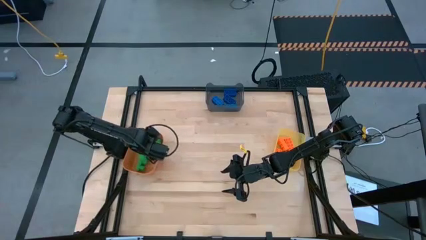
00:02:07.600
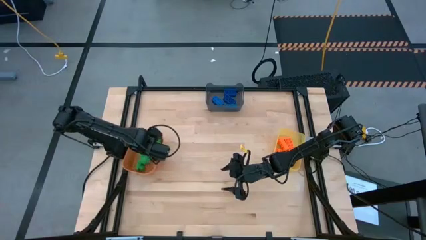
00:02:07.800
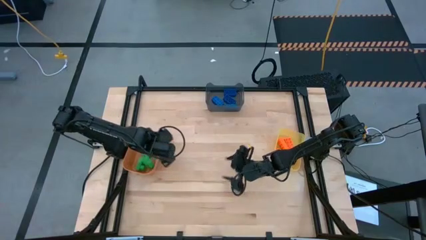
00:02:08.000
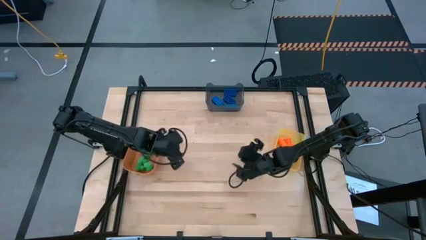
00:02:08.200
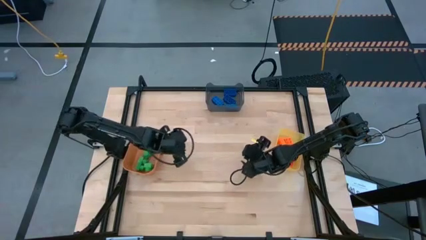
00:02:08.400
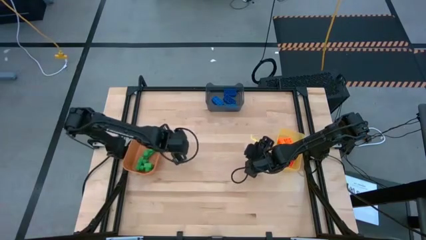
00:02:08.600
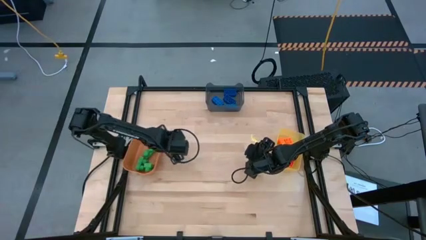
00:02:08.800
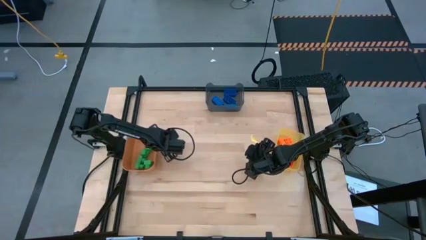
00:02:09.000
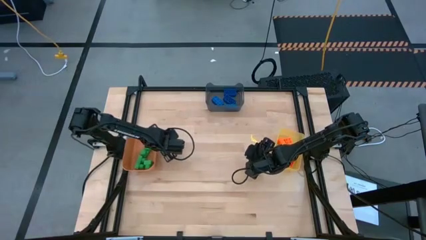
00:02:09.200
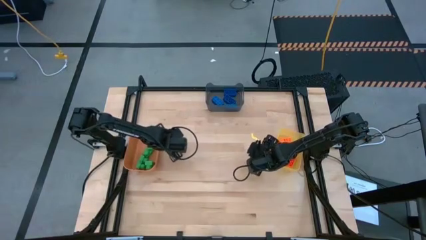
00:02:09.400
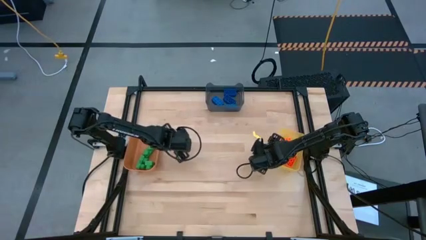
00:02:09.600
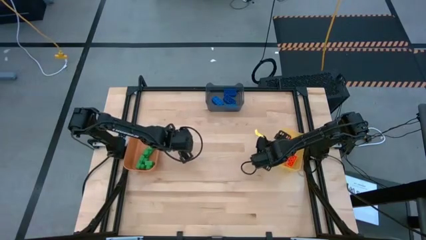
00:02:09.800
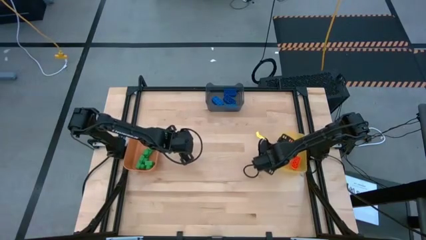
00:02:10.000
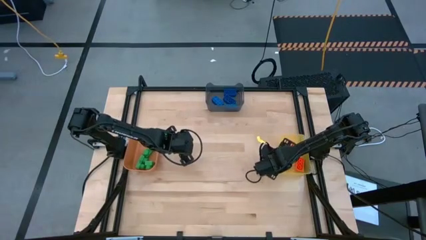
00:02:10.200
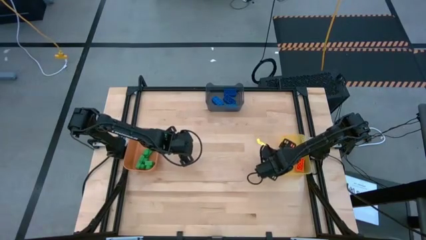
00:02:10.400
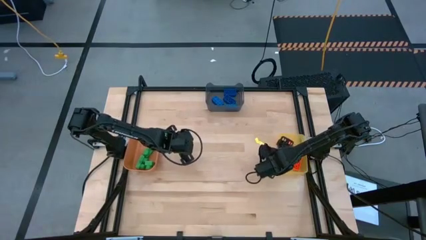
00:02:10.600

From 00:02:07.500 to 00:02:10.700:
Task: Sort & place blocks by color
Adjust the bins on the table

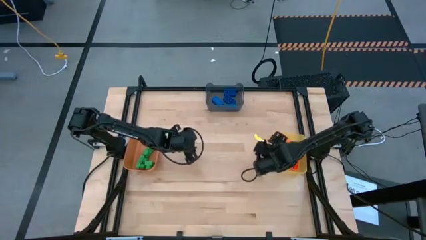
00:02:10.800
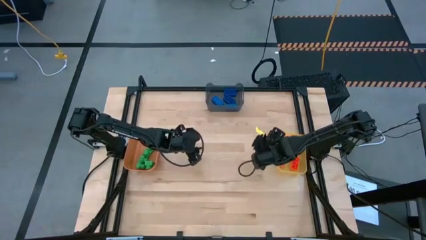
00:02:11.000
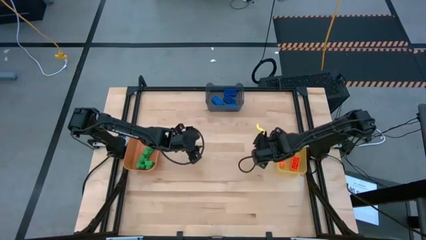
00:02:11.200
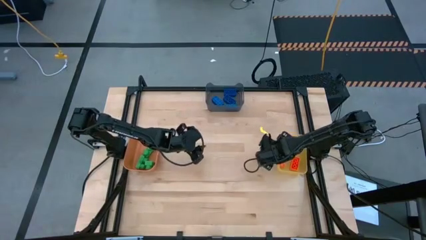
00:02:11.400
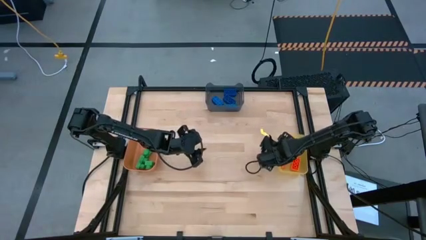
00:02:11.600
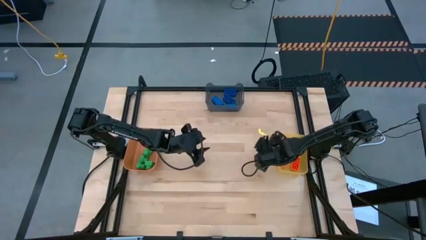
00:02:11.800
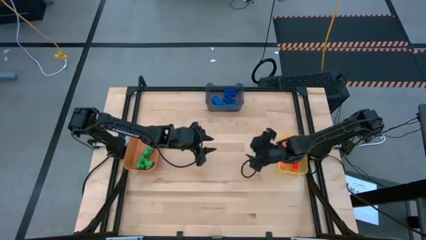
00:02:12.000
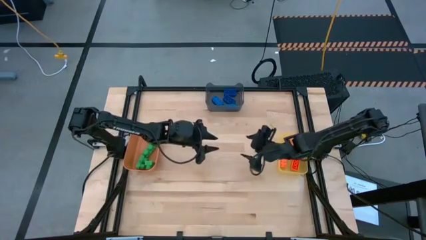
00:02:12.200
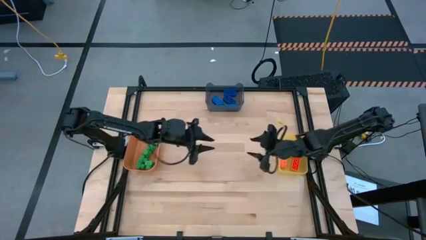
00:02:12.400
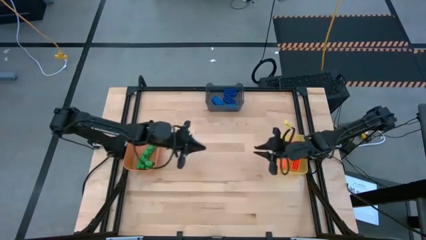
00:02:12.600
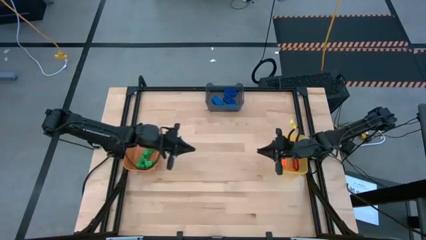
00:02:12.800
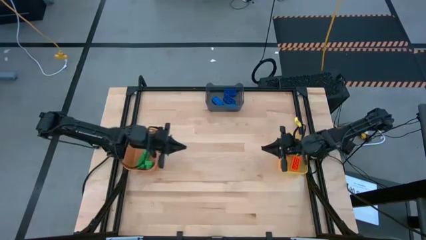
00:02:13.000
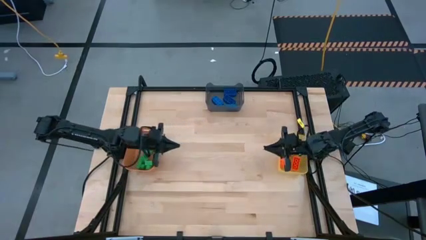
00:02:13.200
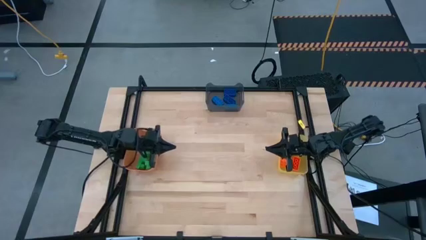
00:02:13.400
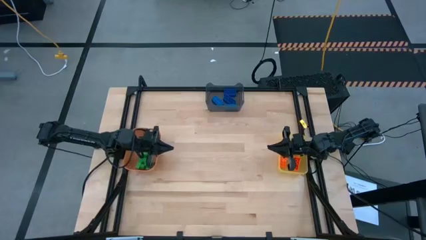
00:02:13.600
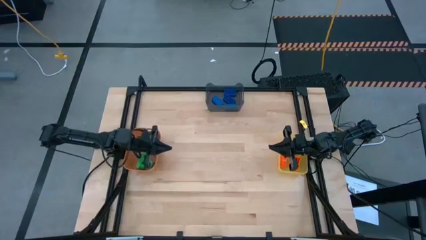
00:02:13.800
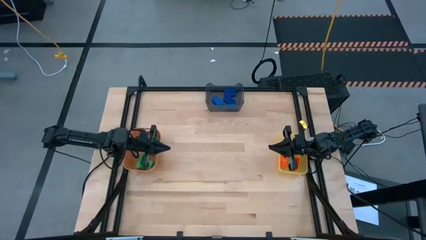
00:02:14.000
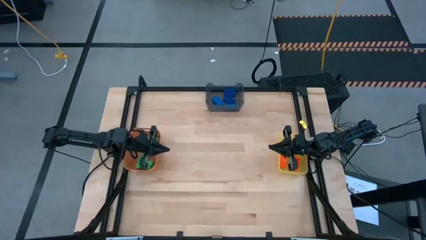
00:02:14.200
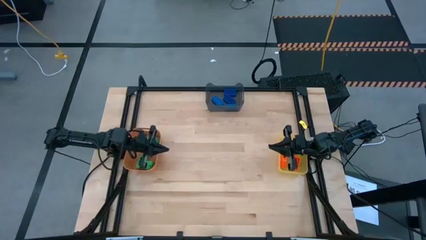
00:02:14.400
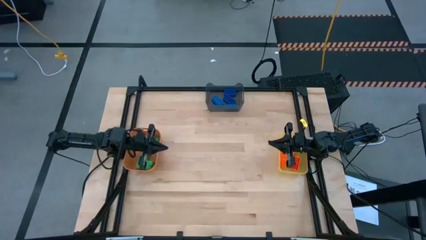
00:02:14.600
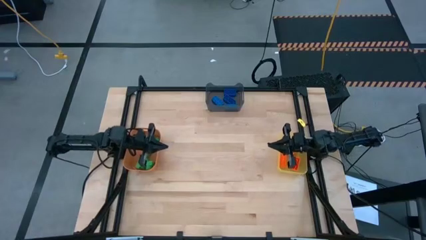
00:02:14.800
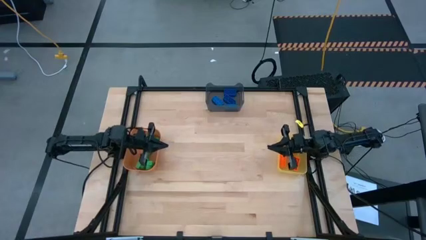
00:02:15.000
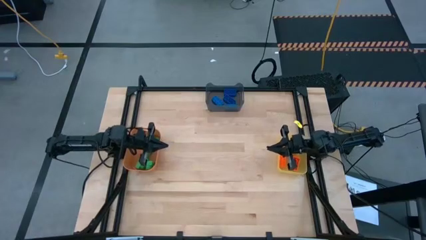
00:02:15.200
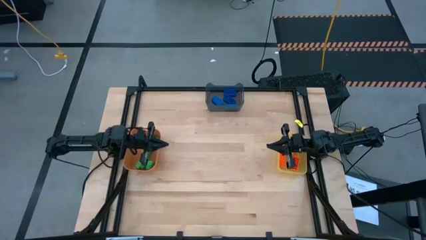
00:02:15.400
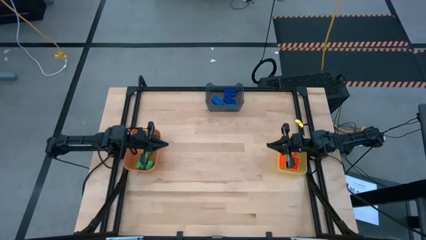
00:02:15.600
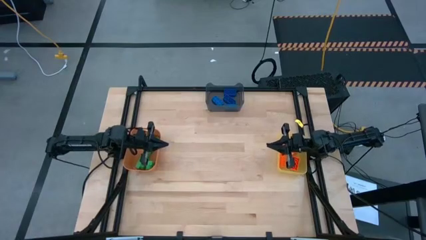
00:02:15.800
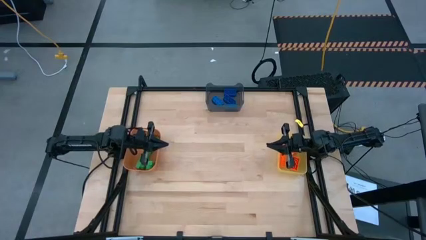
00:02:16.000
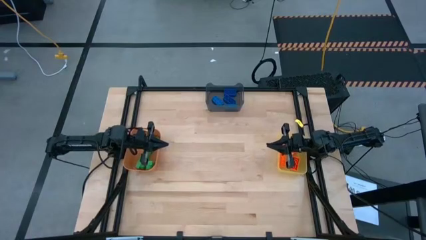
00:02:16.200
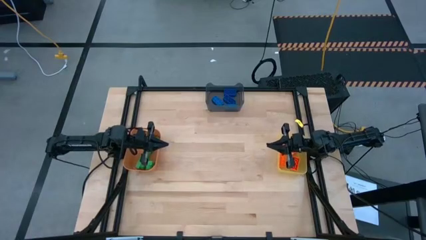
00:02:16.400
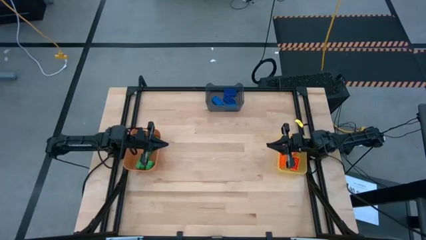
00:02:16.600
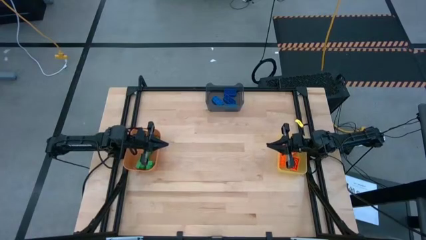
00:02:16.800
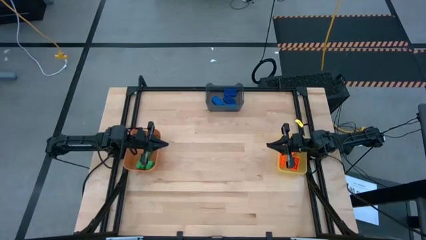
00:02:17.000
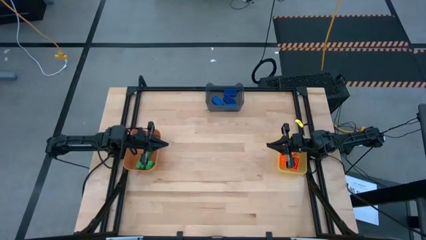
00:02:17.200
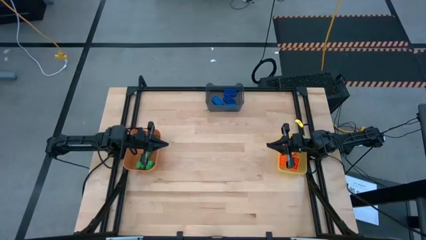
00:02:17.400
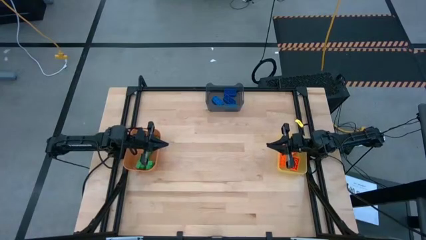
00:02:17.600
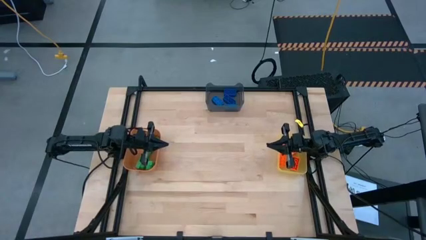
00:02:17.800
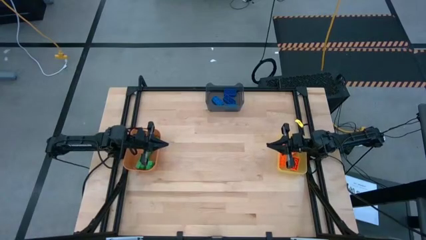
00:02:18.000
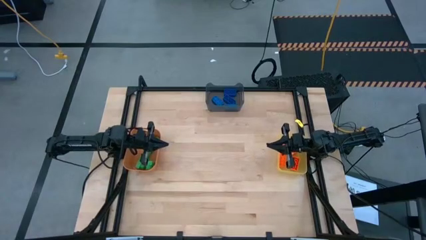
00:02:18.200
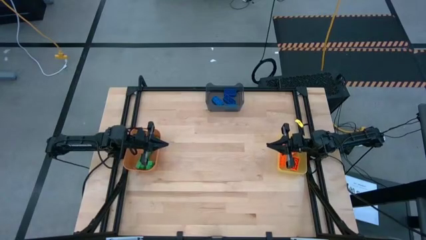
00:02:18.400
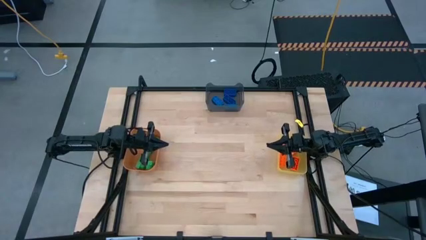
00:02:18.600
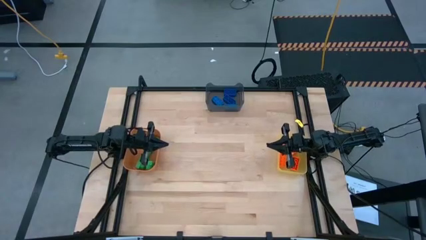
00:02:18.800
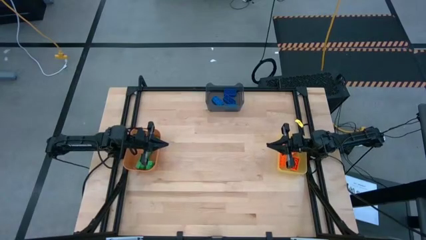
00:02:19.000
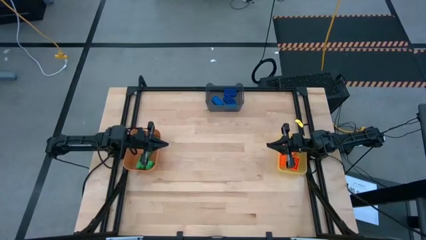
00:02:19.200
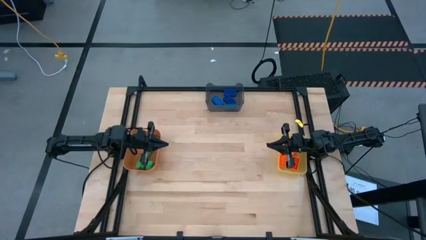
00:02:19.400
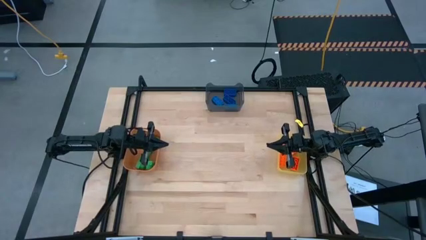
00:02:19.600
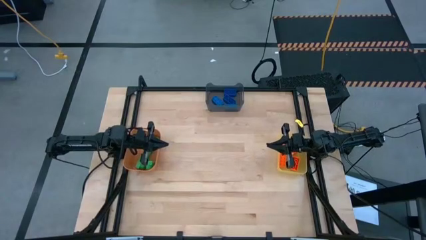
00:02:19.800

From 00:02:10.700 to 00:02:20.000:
Return to Home Position

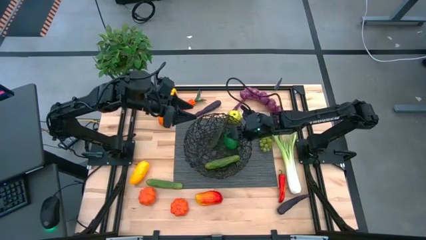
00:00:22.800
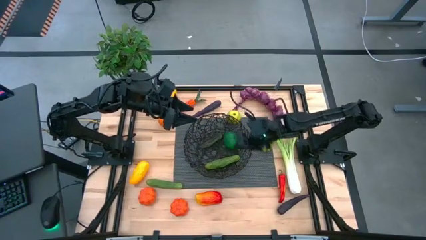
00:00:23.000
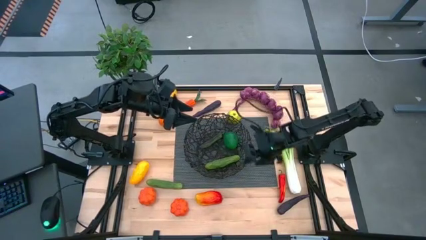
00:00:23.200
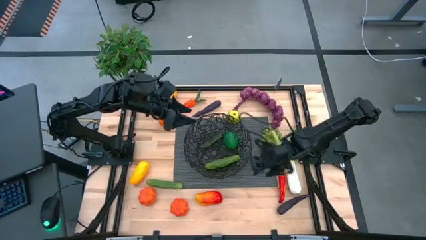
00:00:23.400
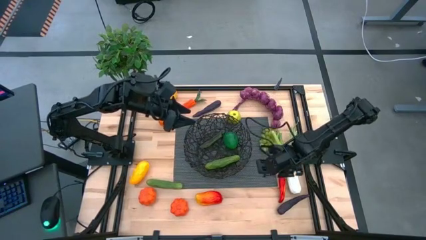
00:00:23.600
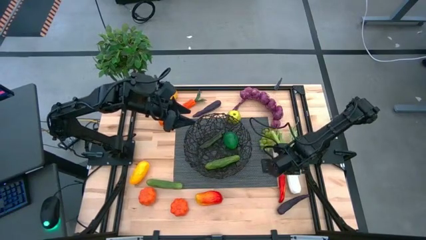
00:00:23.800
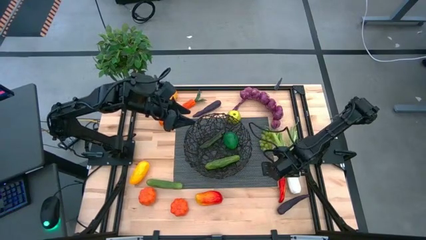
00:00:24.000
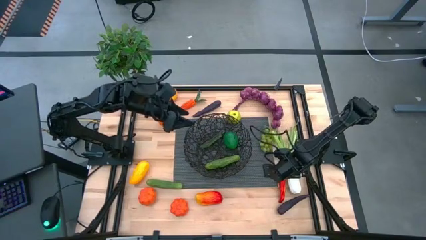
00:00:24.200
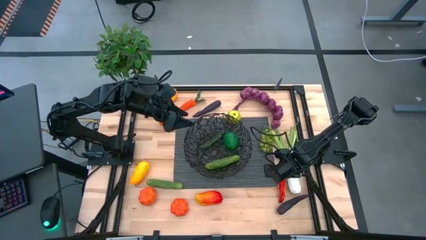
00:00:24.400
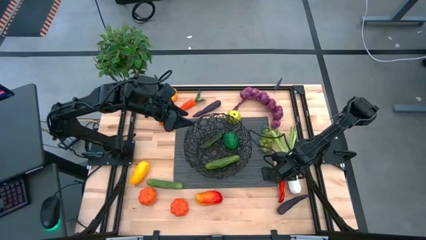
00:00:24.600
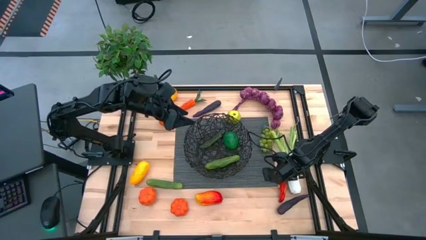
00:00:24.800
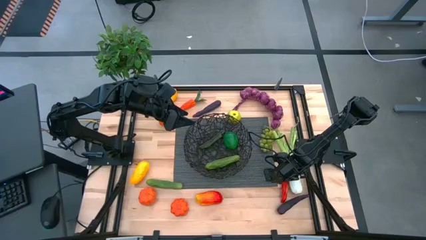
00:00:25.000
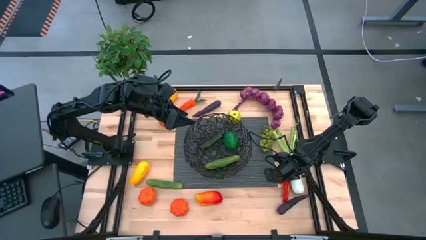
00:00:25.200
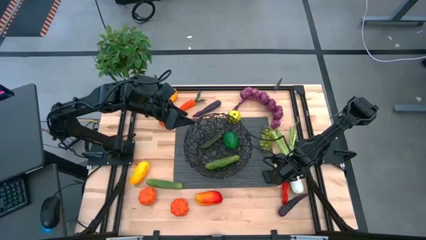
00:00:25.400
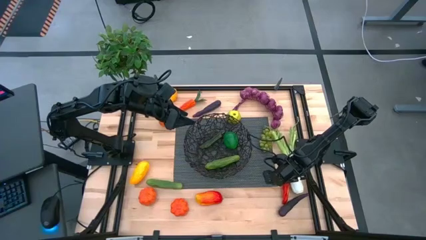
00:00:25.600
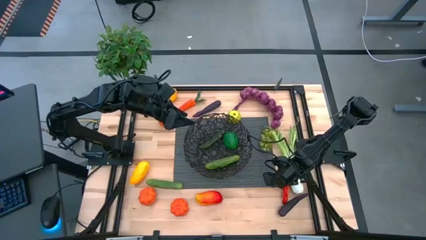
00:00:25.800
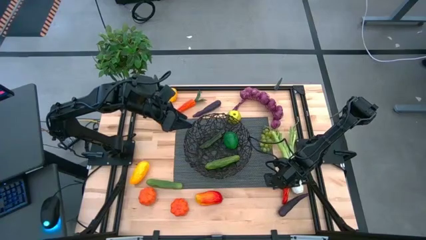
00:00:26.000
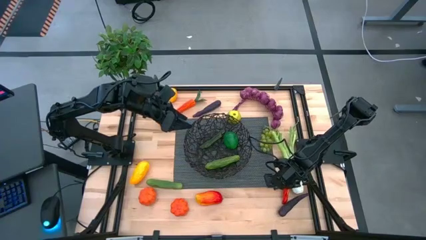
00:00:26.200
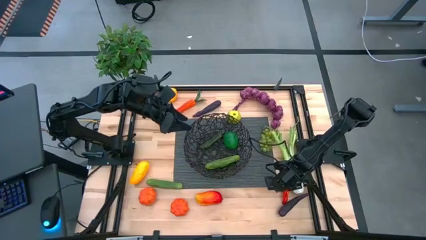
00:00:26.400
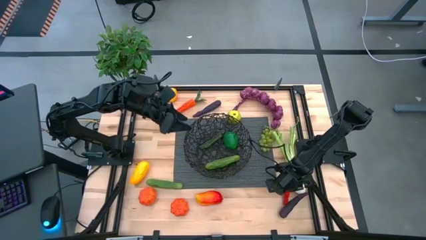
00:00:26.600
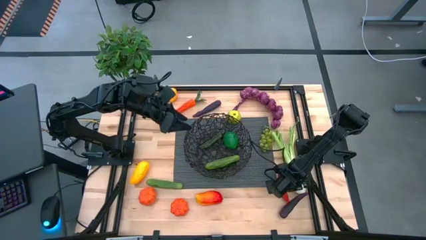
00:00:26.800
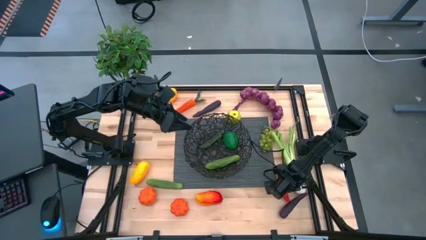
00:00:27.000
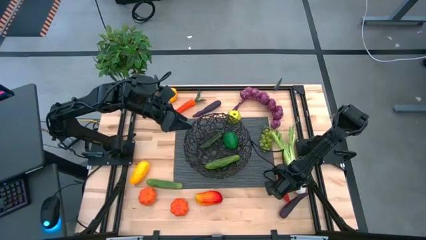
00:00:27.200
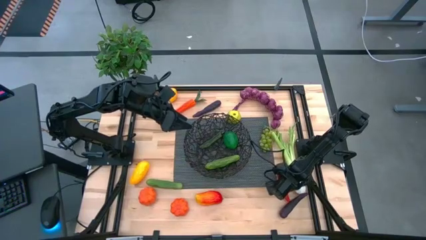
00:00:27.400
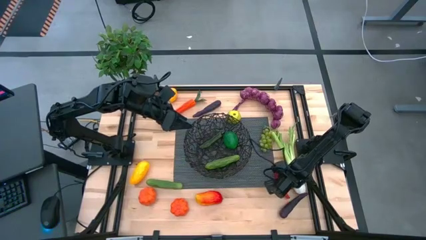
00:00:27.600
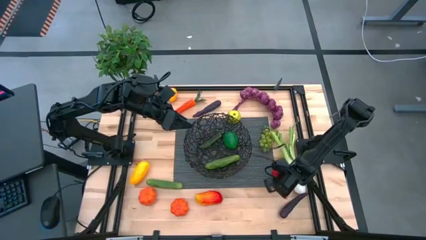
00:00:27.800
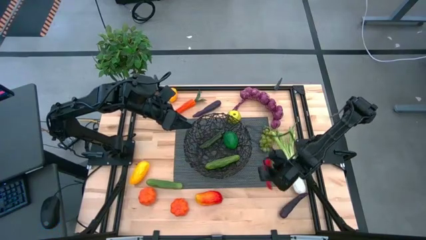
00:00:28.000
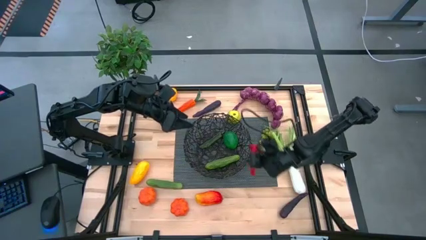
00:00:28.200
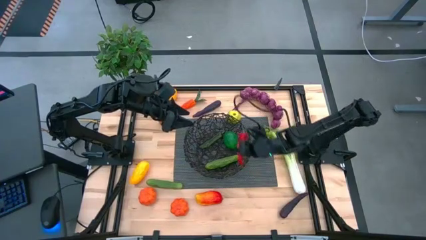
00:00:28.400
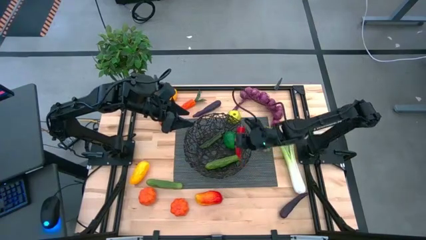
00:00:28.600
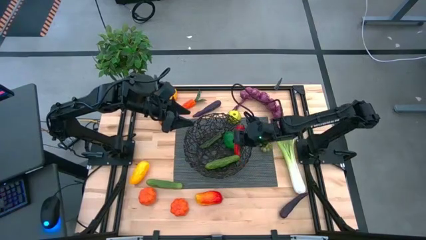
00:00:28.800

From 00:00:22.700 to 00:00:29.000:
Task: Build produce basket
Put the red chili pepper into the black basket
